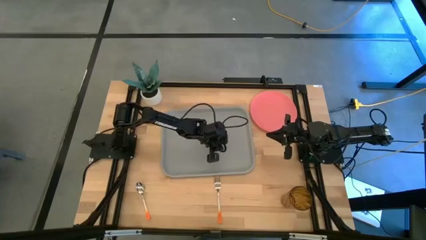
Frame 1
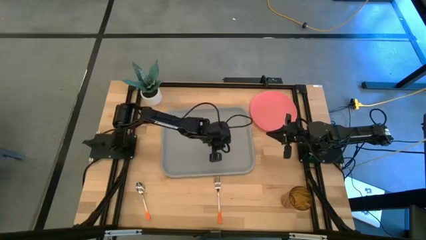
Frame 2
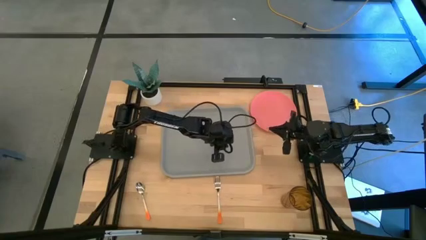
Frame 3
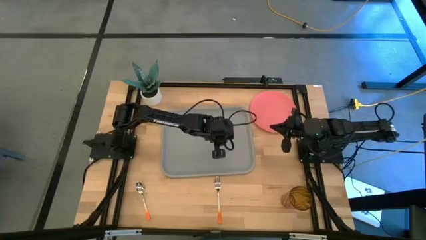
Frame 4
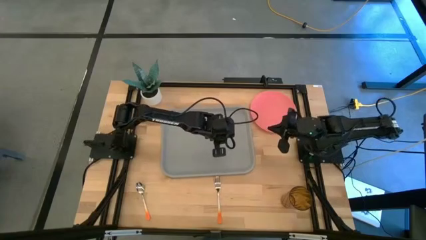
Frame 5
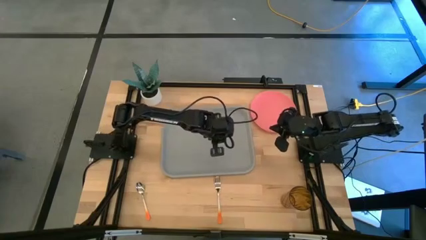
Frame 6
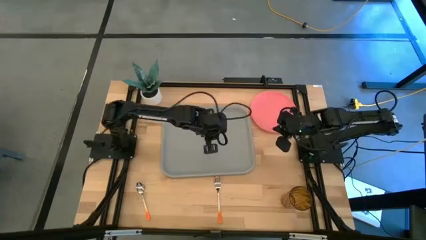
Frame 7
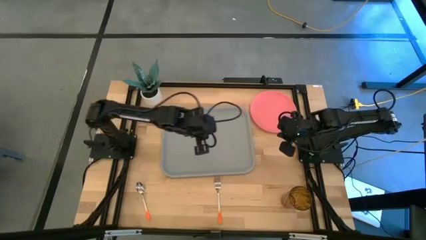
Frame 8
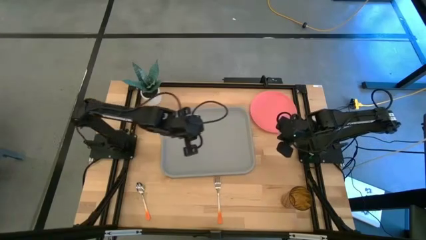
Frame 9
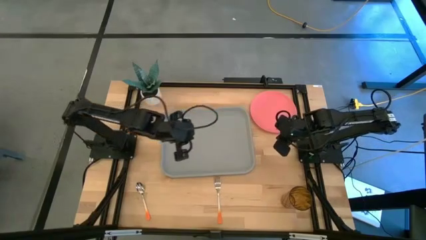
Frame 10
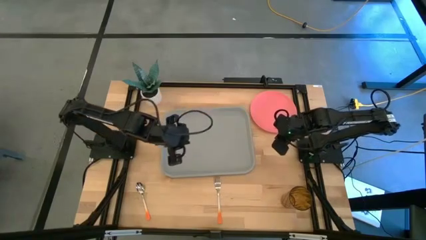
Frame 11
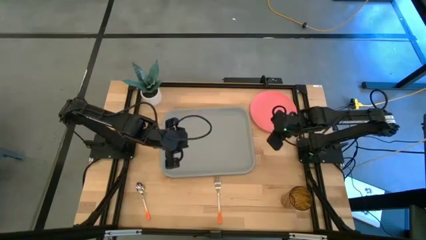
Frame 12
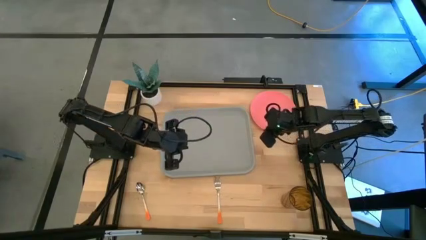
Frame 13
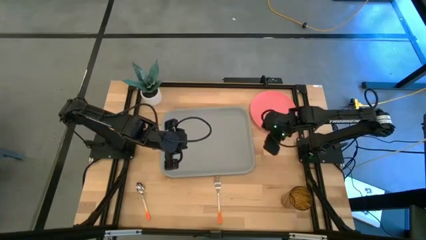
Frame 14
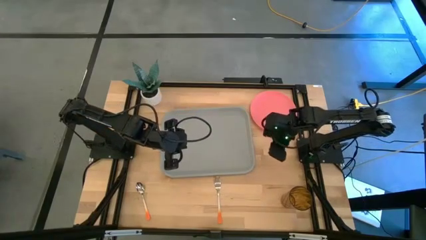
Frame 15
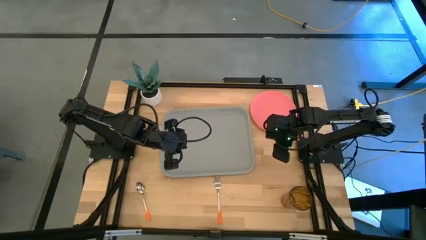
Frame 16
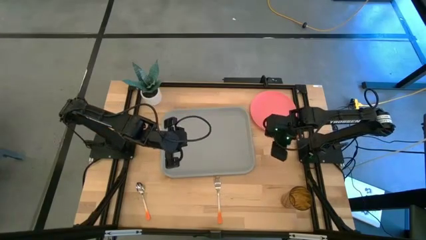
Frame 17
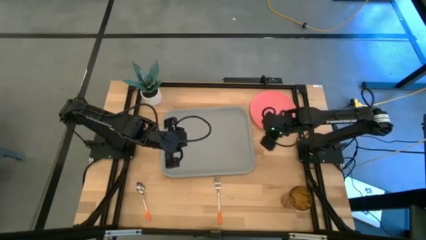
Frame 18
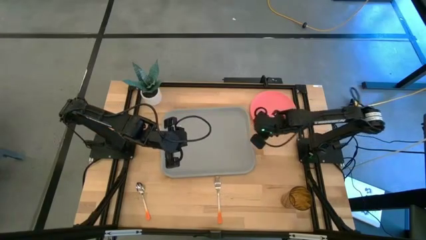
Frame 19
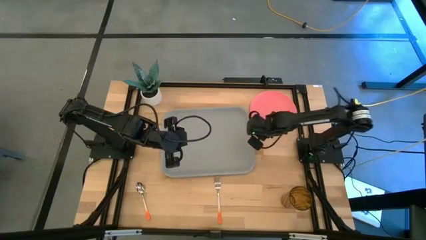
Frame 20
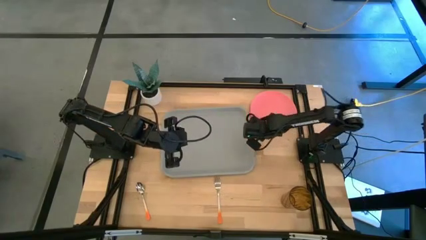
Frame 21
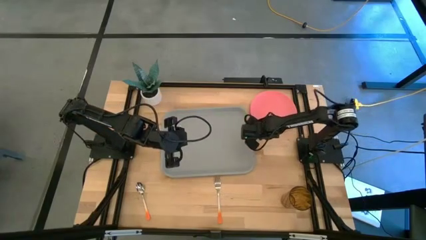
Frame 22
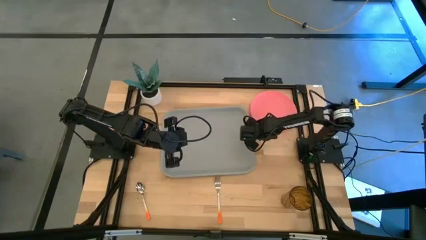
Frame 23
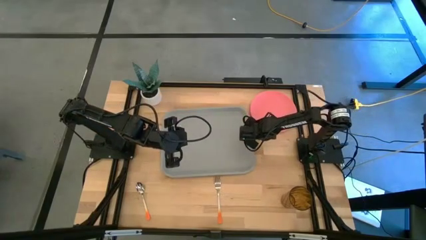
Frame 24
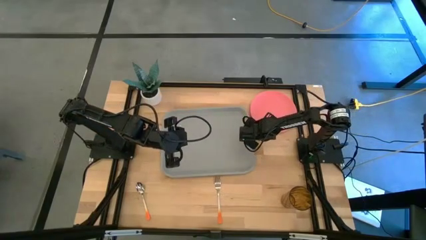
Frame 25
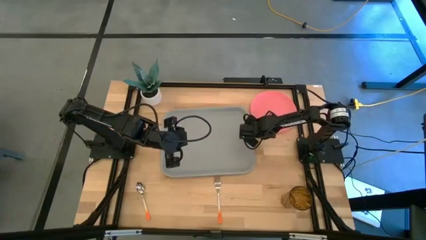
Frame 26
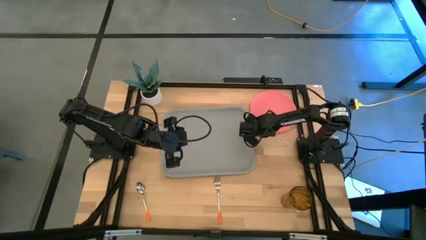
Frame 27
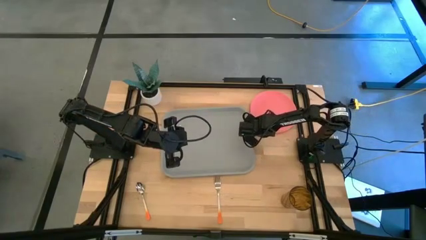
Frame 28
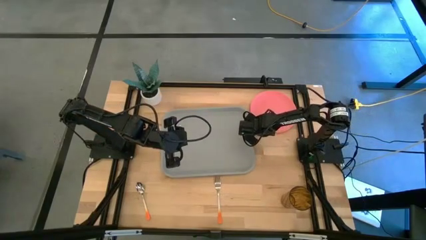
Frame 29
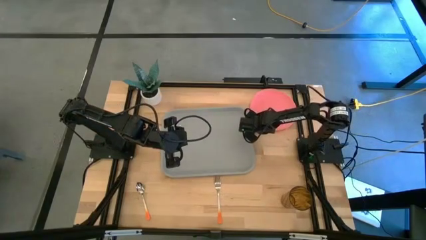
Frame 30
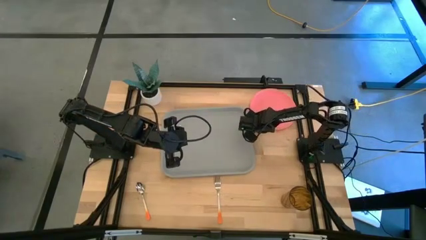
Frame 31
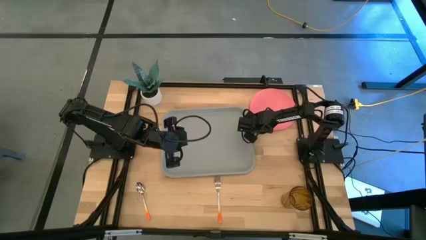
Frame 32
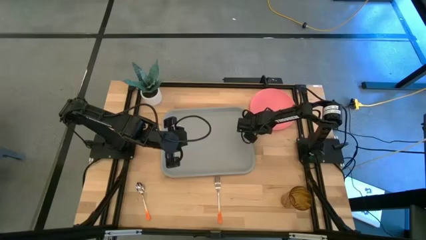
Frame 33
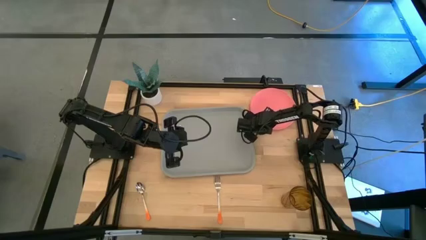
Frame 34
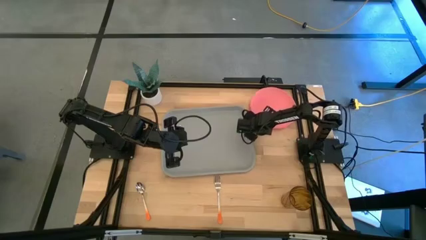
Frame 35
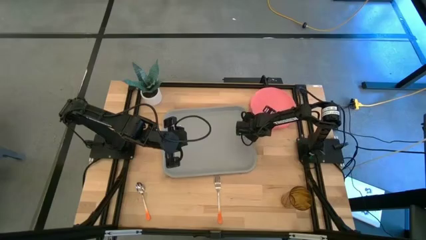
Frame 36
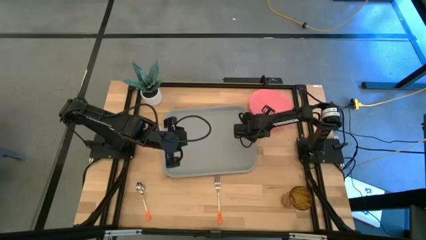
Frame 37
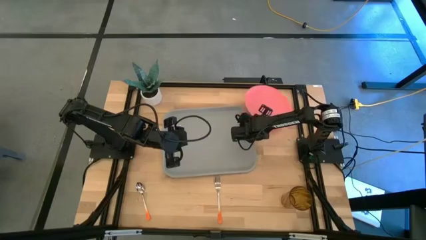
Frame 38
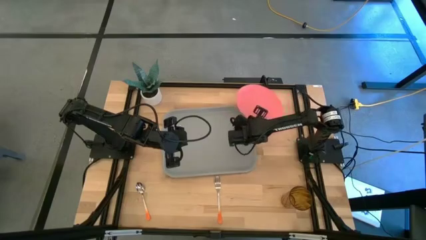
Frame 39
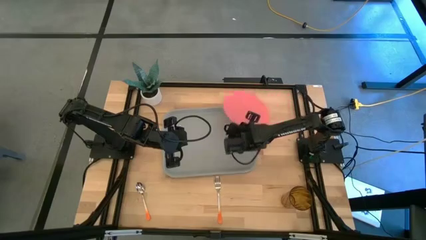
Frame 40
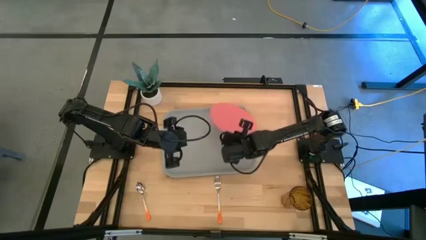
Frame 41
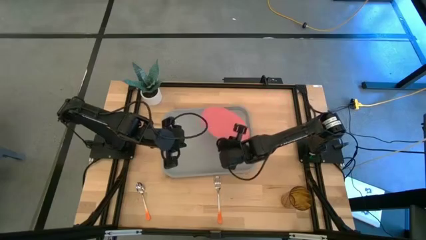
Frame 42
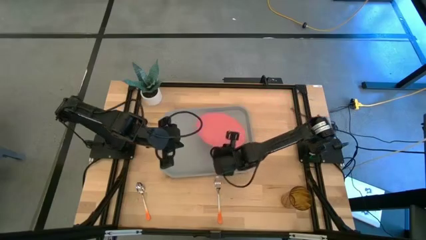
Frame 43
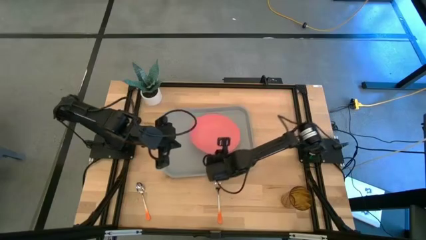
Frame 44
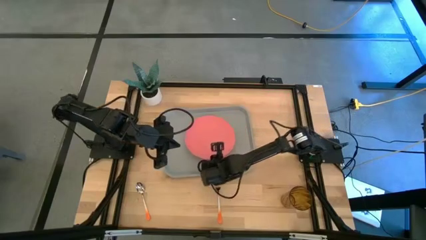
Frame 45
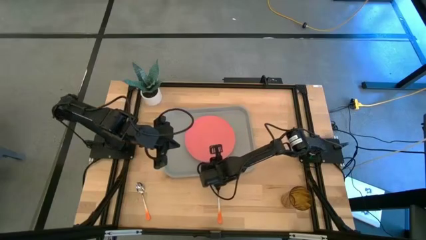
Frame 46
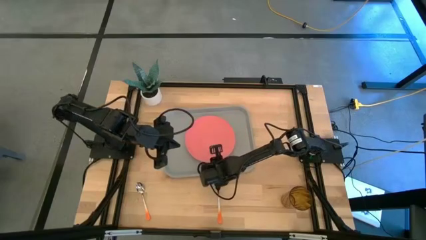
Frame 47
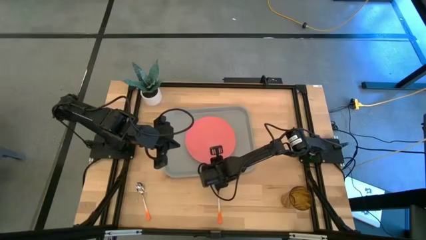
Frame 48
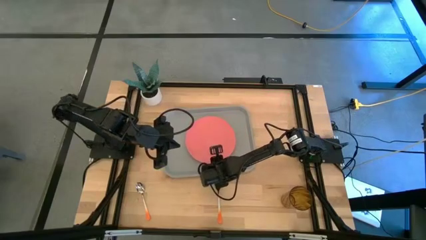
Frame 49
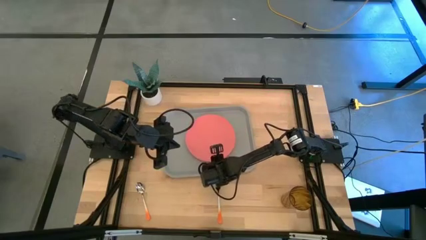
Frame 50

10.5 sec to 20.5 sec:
Task: Pick and place plate/cup/fork/spoon on tray
Put the pink plate on the gray tray

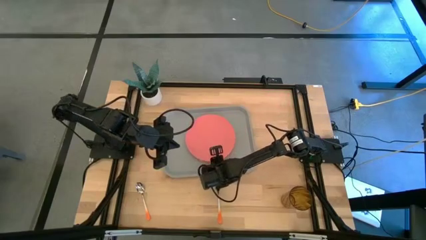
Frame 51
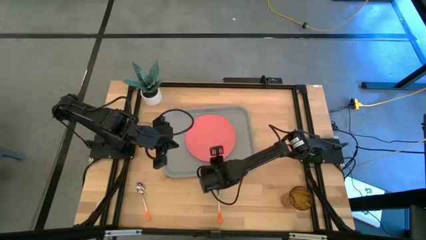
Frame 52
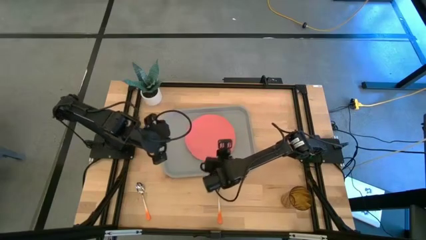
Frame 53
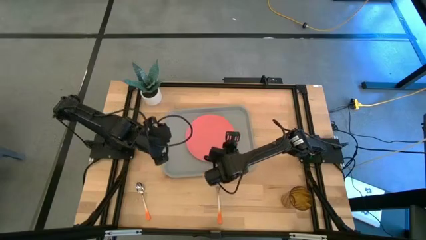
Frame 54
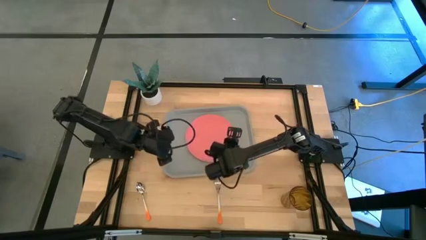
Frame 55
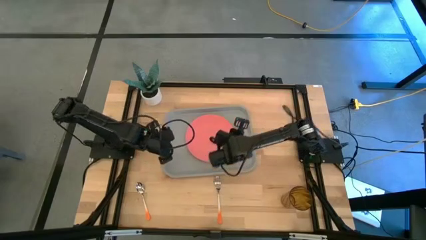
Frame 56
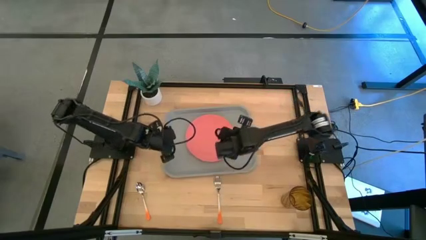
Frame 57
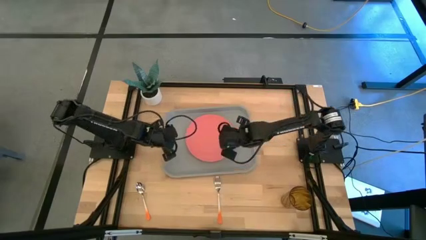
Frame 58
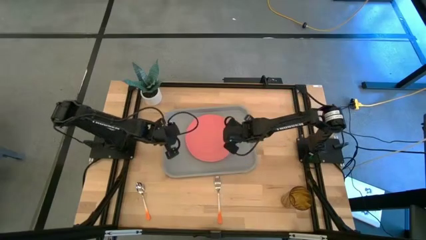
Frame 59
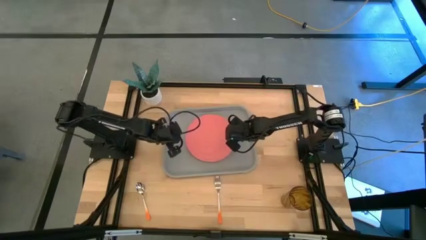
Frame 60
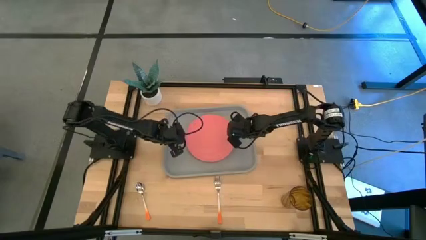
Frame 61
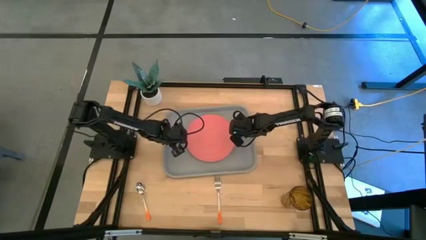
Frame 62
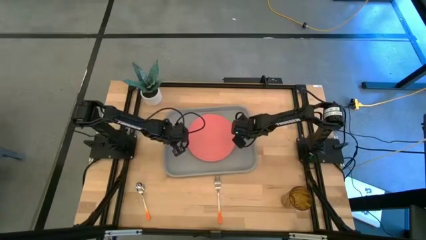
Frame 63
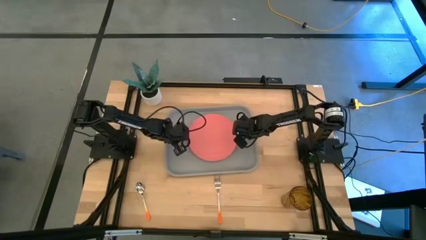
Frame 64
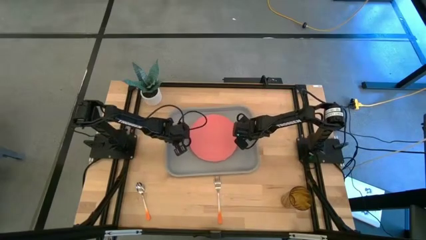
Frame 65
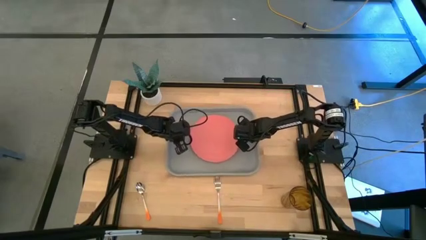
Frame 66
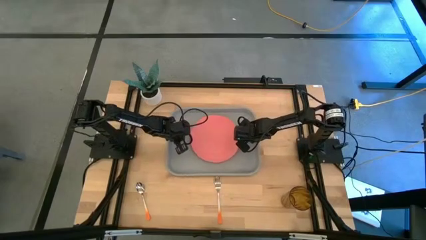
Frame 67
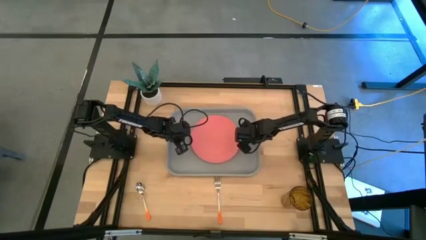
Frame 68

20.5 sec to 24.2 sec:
Adjust the gray tray
